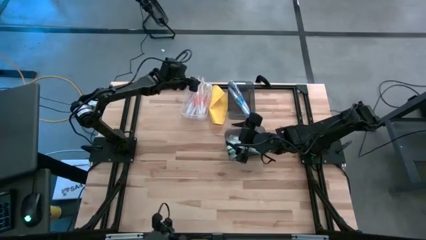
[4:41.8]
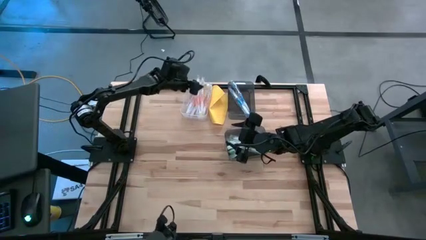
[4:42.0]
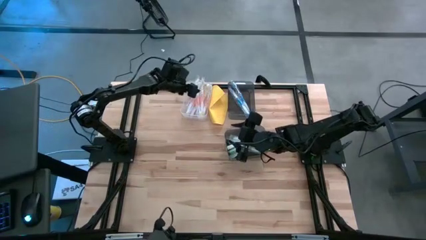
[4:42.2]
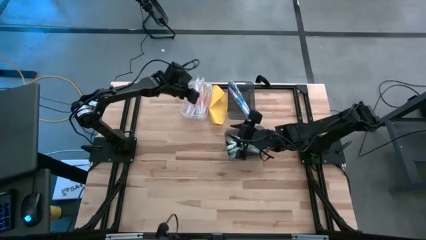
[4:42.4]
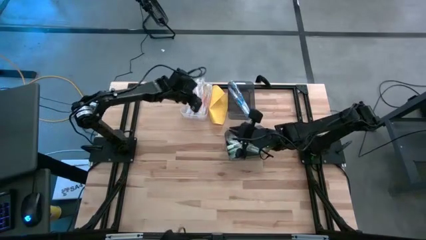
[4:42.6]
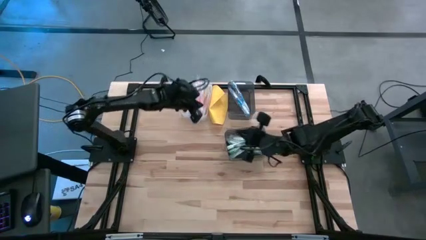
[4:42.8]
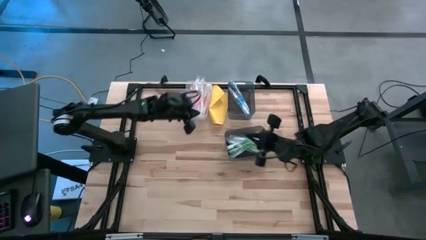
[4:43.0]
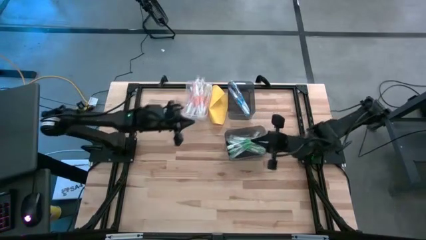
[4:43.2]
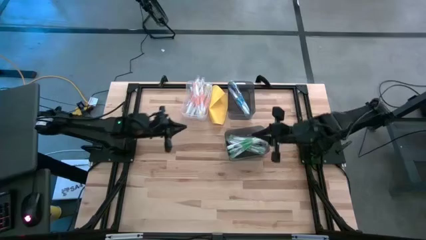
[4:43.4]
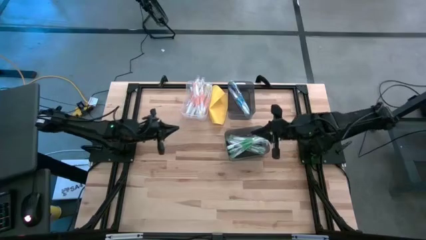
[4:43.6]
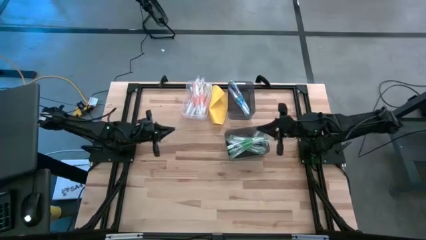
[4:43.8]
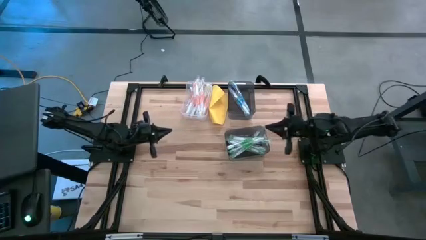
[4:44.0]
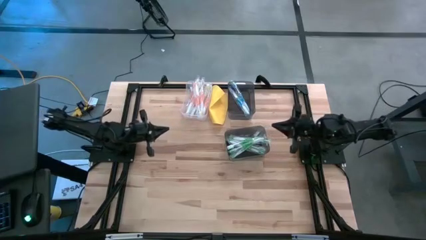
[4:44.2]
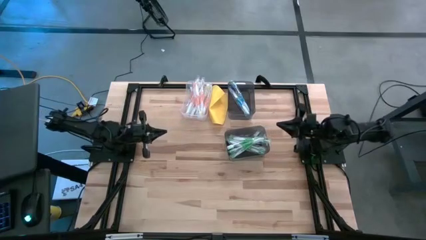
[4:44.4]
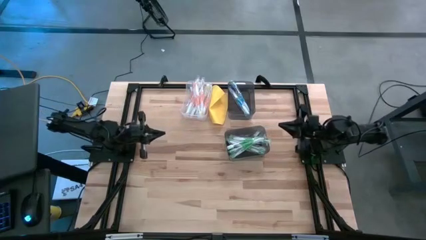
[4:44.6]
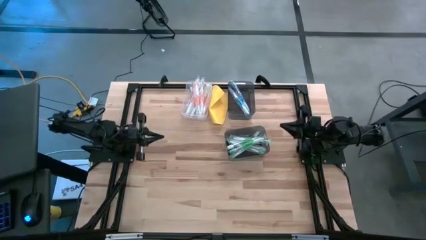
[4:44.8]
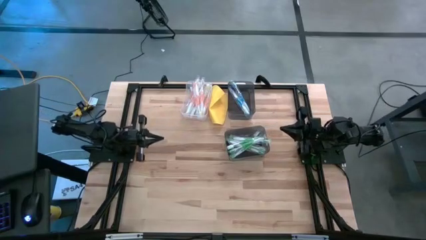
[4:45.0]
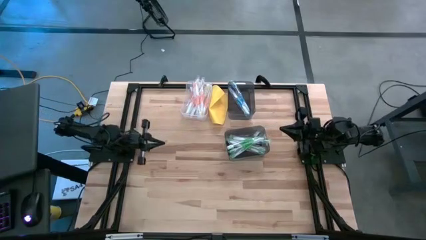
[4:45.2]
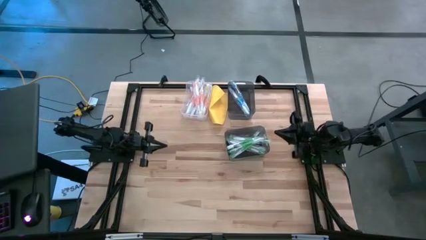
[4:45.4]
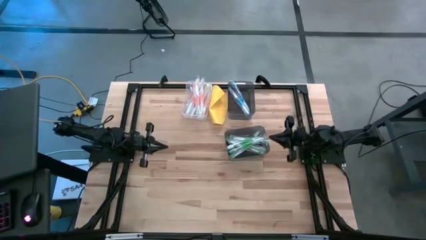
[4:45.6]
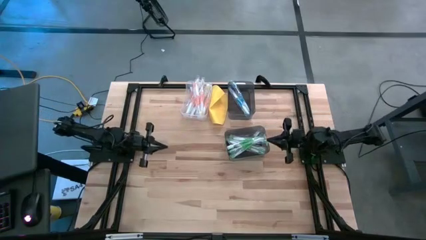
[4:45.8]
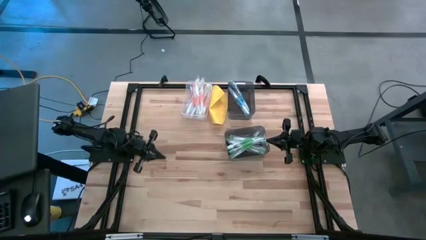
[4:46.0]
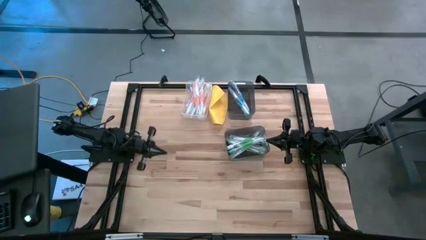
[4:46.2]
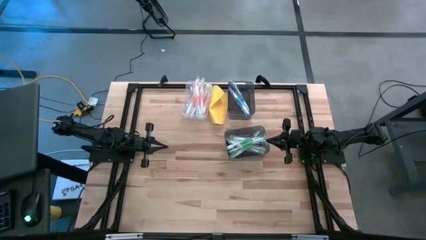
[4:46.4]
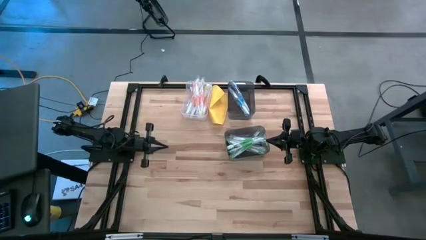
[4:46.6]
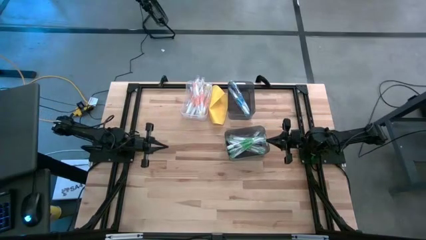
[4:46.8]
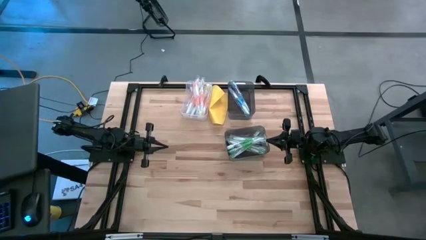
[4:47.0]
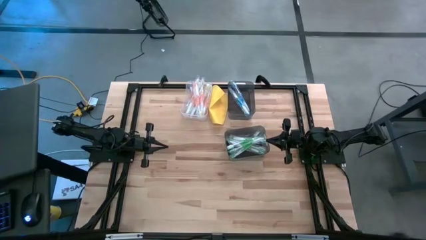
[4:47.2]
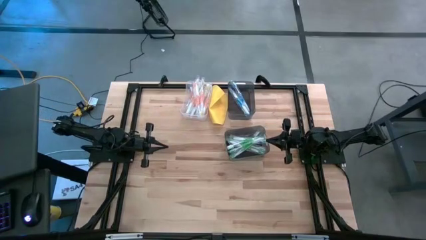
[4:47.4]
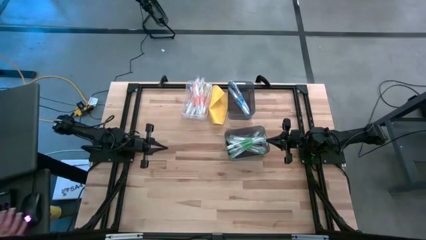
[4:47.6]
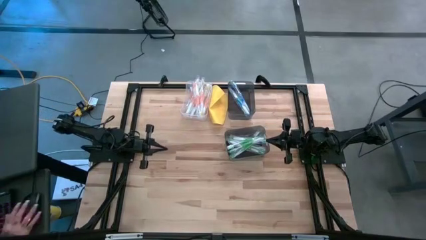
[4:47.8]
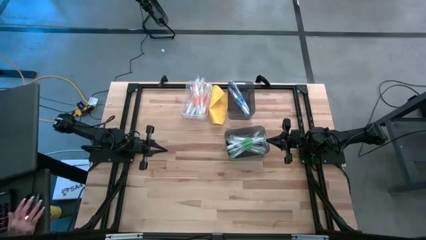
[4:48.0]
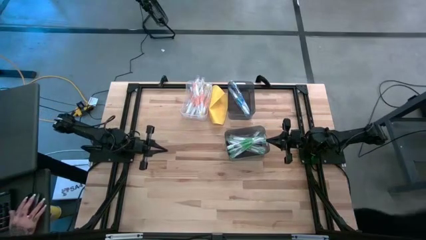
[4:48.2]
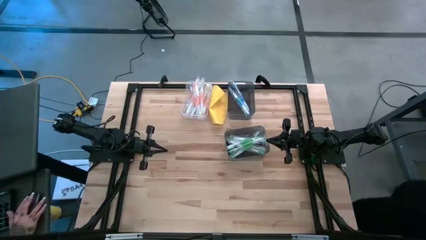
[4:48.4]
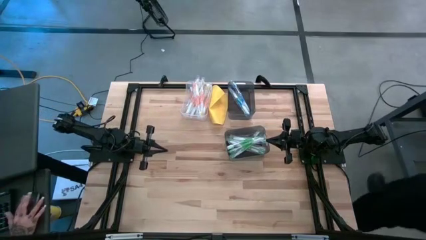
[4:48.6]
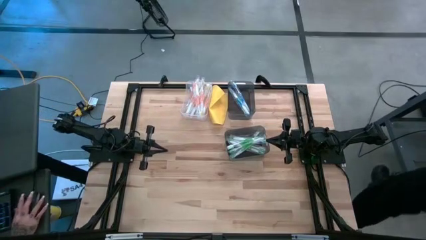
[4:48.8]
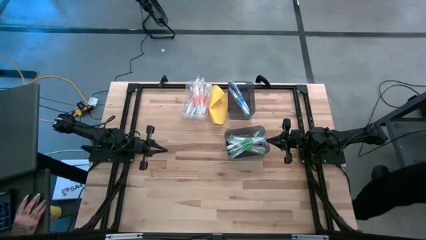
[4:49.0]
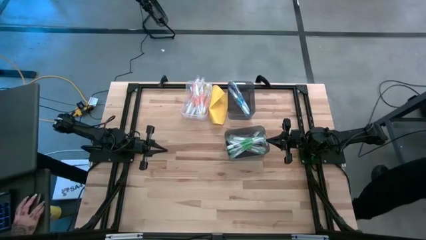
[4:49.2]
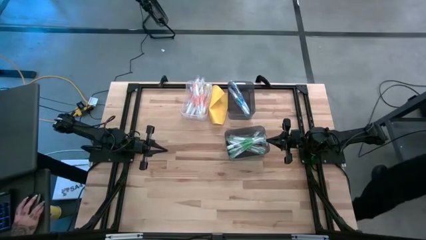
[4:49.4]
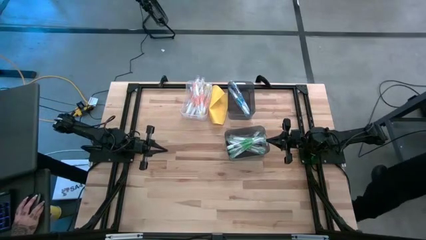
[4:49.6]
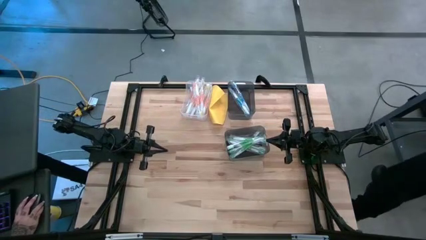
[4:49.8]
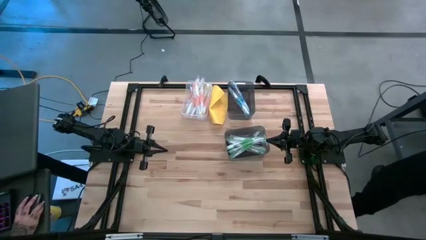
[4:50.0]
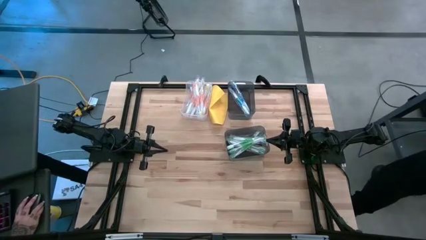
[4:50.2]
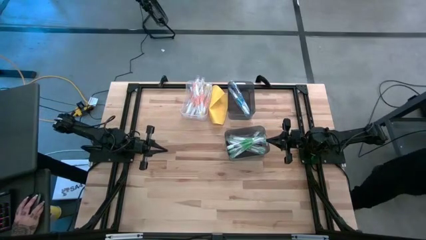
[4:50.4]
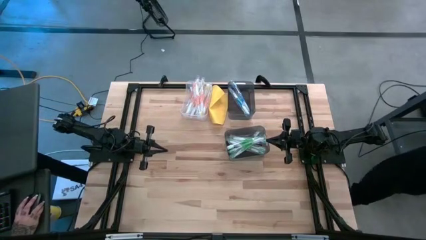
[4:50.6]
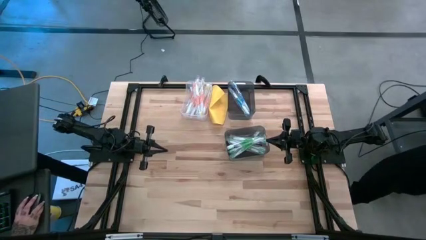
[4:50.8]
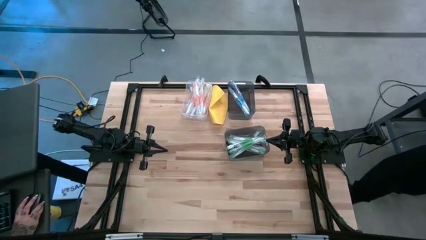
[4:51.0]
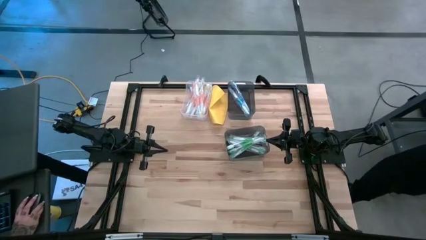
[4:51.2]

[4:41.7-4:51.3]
Task: Pick & Place Toothbrushes
Return to Home Position

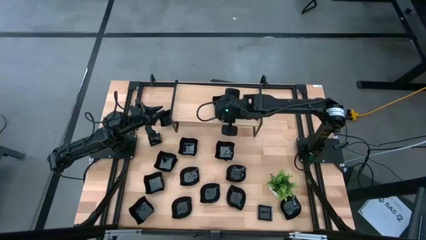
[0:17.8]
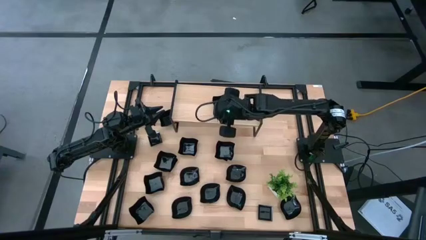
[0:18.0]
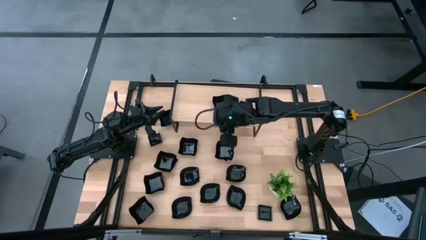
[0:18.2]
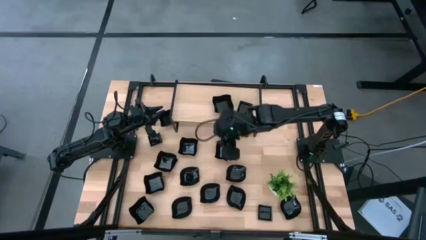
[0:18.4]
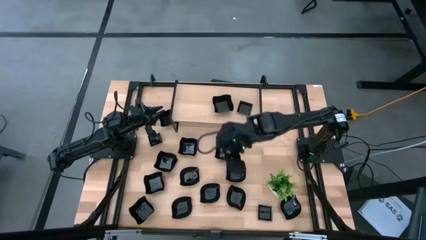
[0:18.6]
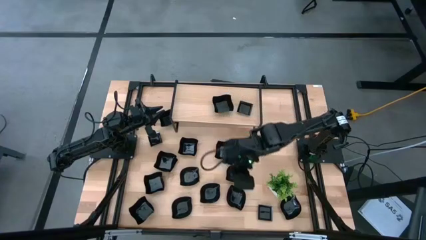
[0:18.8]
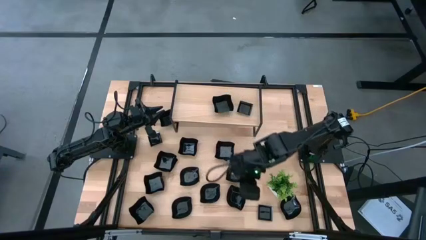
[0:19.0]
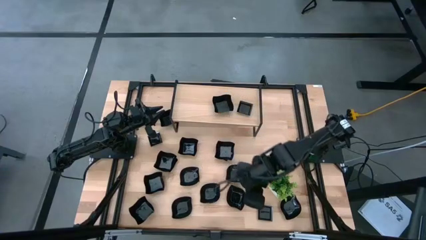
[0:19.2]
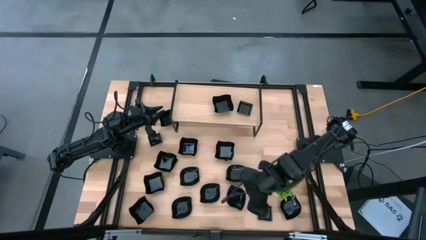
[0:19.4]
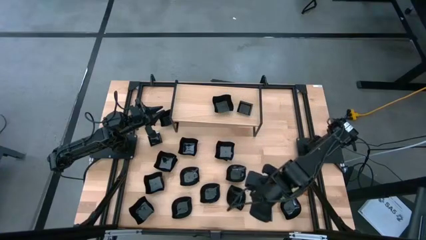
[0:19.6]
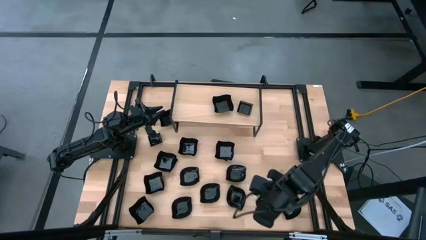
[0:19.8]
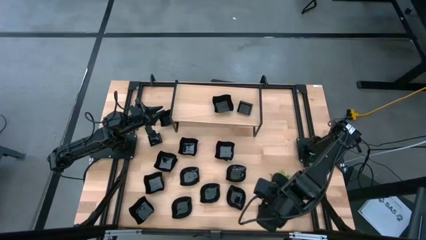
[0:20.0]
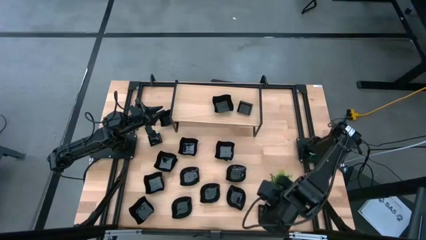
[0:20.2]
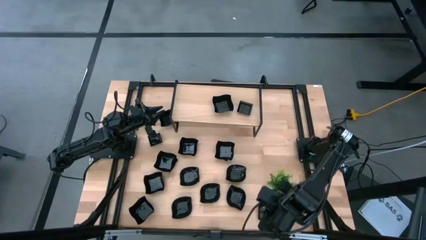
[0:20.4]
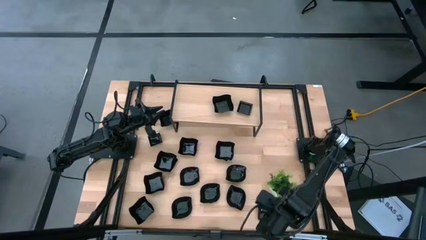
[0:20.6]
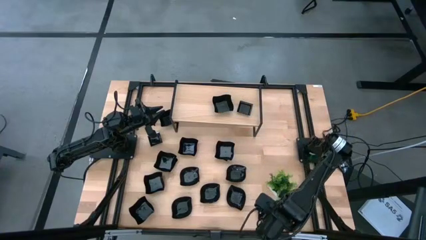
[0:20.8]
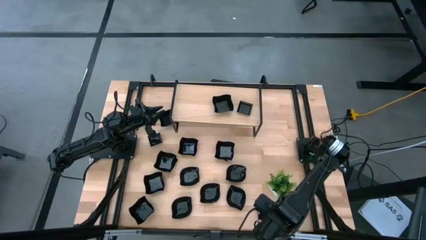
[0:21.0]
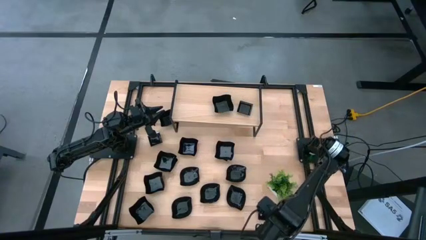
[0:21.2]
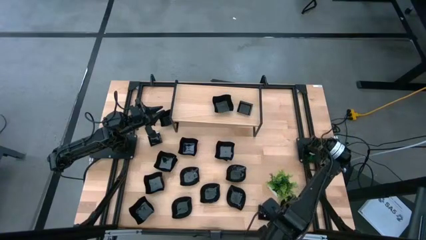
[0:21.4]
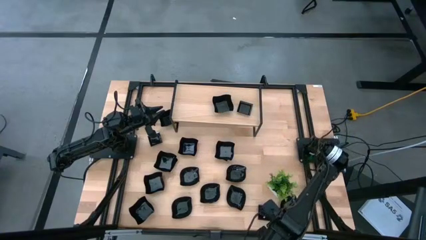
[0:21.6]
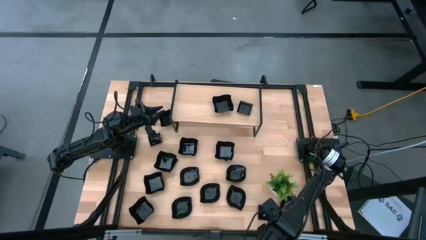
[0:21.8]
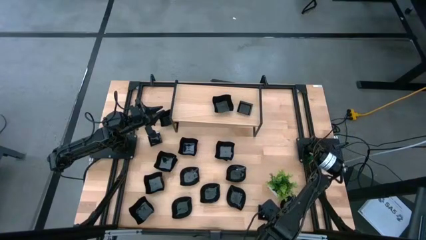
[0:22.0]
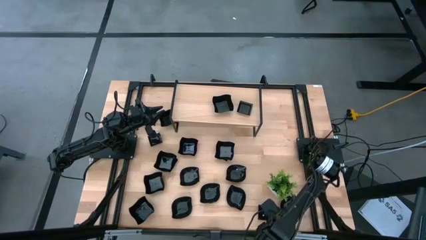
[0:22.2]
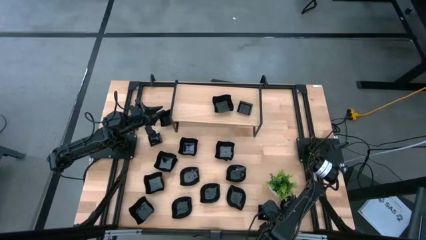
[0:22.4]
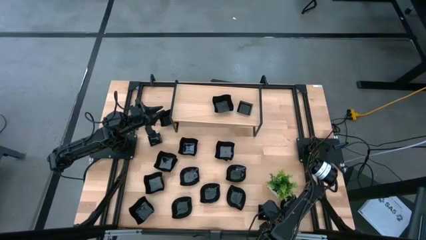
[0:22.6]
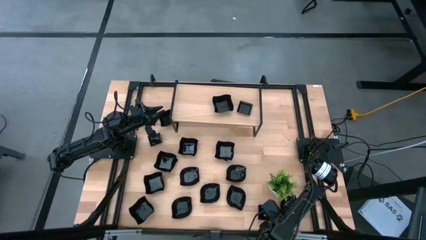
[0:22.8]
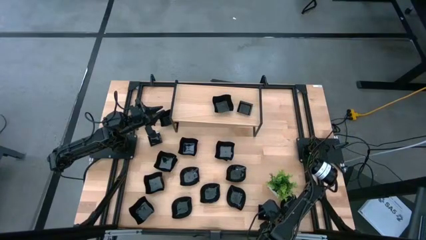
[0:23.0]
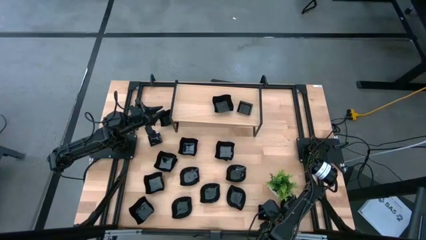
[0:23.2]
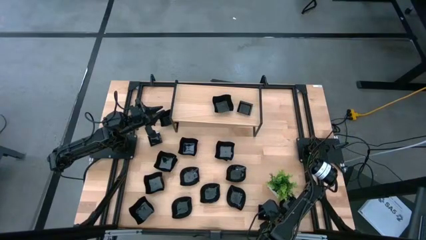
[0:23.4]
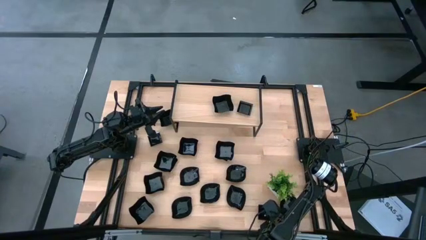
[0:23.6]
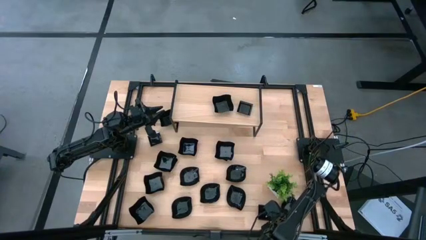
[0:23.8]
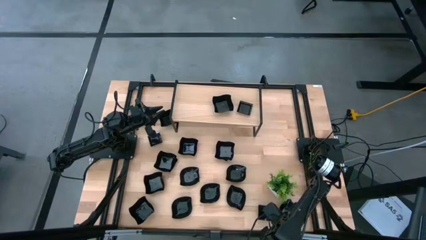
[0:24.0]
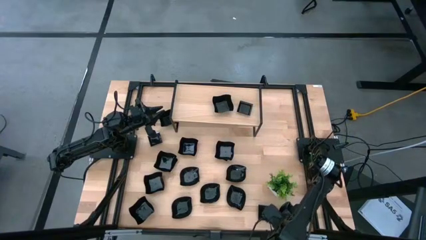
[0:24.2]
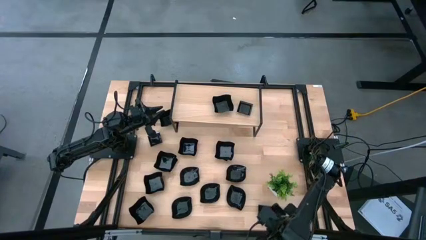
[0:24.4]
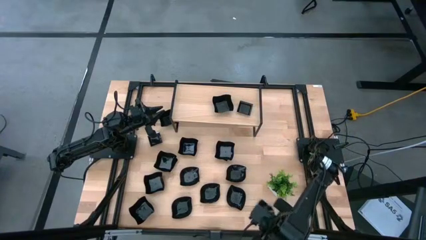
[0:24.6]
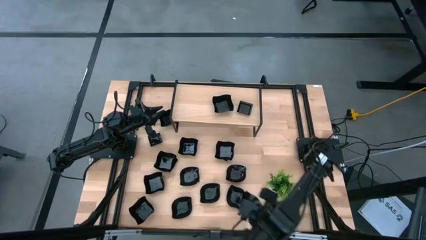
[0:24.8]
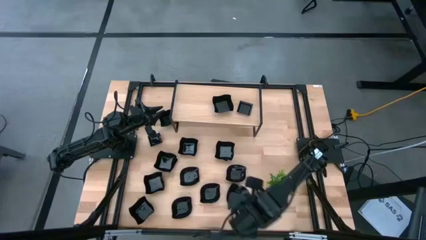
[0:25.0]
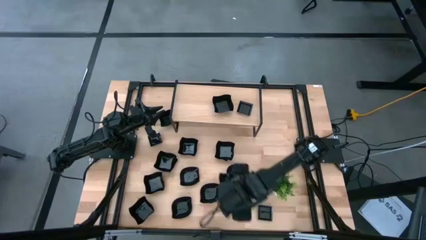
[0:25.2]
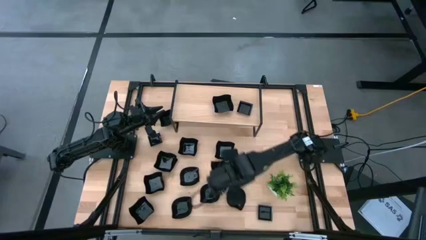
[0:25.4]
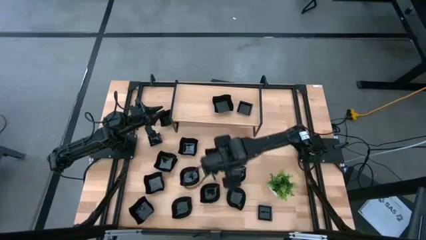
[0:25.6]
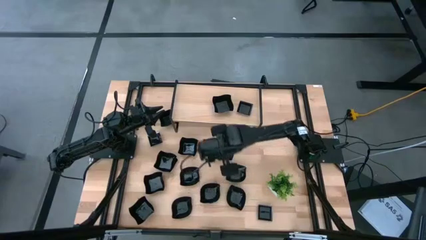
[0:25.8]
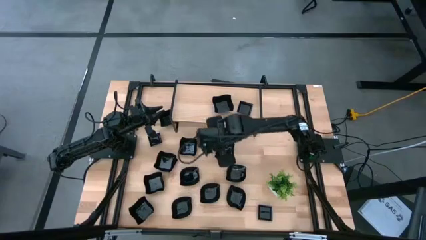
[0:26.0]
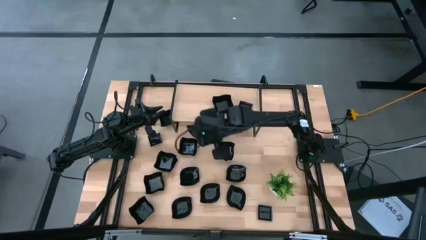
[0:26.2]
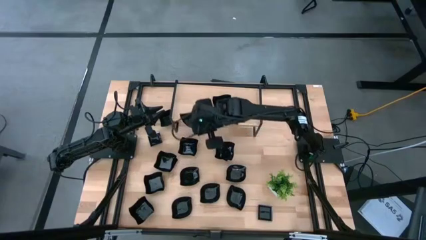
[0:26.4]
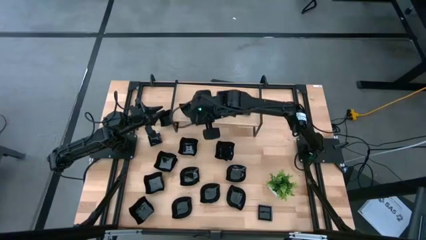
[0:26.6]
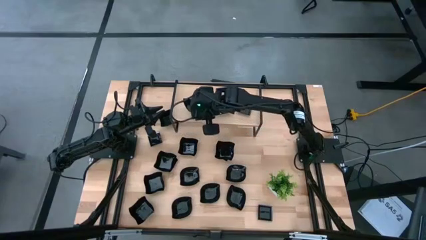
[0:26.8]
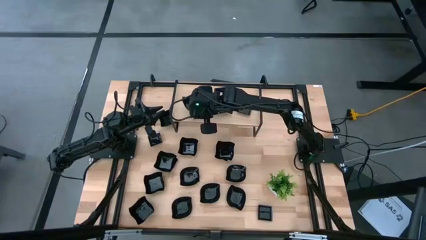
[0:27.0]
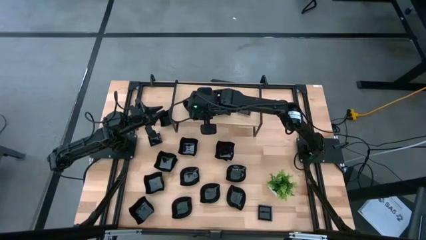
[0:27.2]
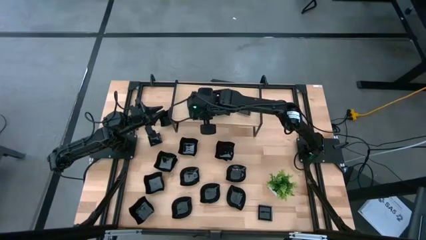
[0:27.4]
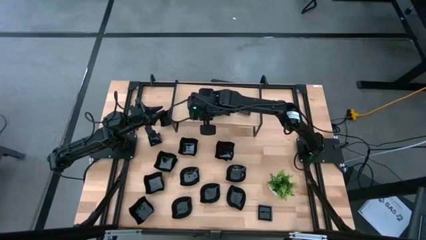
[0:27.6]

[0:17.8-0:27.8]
Task: Pick & Place Mini shaped plates
Put the leaf-shaped plate on the shelf
